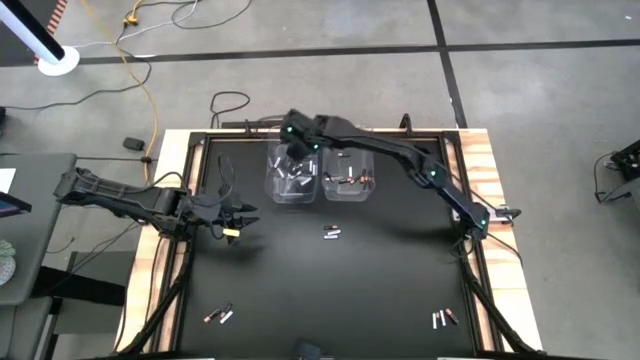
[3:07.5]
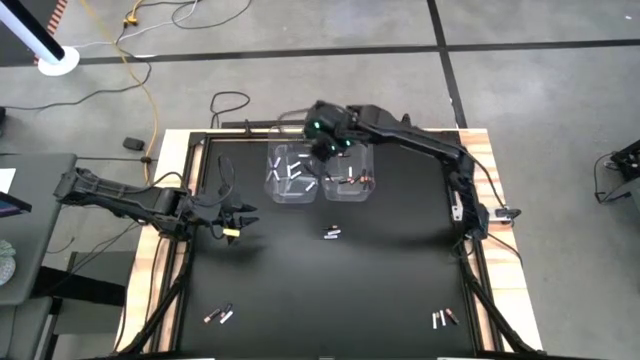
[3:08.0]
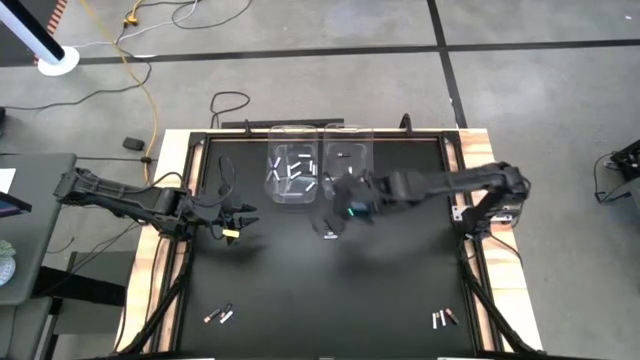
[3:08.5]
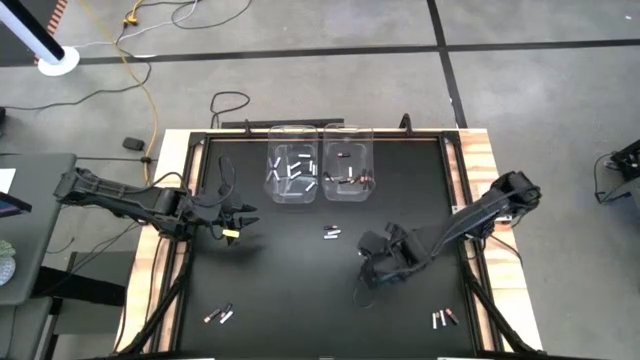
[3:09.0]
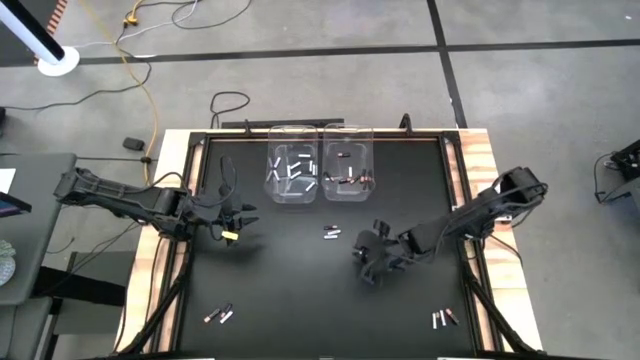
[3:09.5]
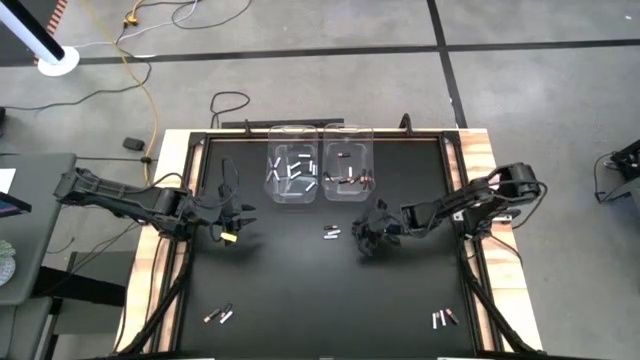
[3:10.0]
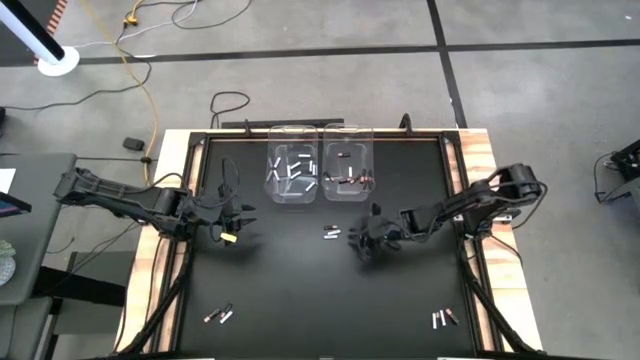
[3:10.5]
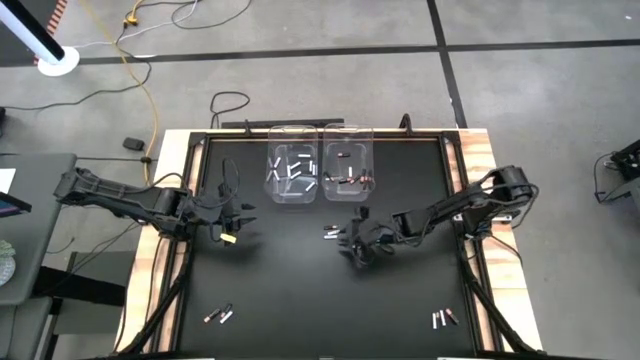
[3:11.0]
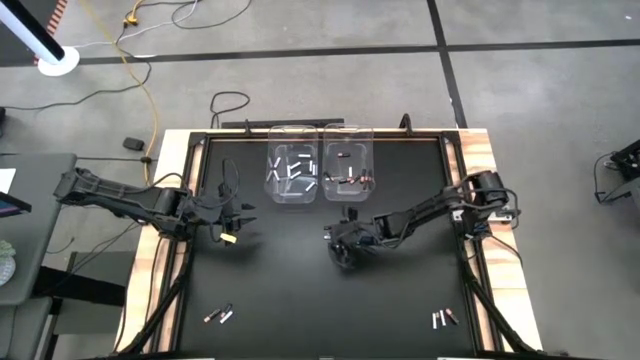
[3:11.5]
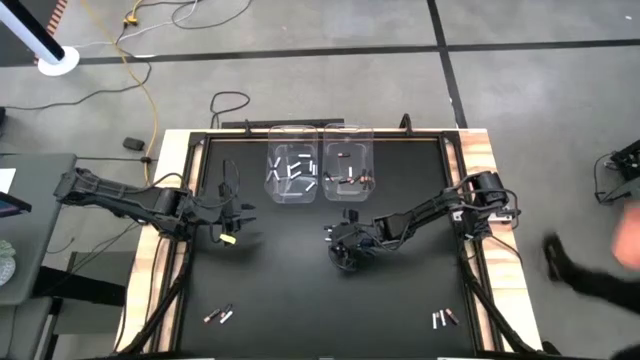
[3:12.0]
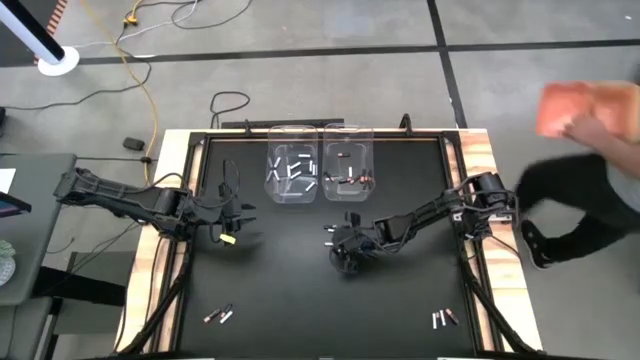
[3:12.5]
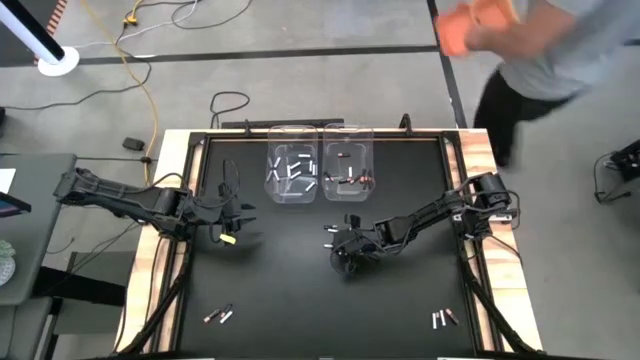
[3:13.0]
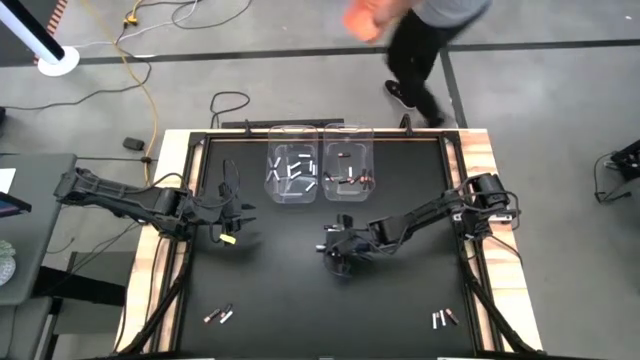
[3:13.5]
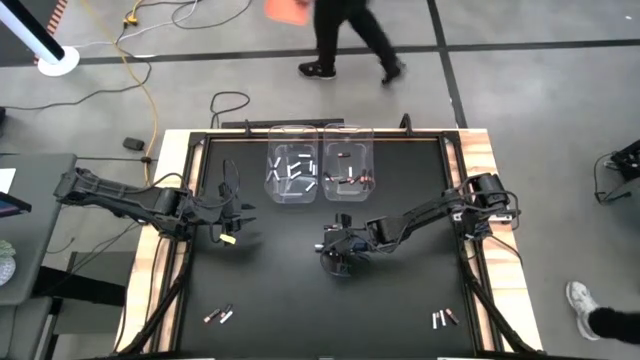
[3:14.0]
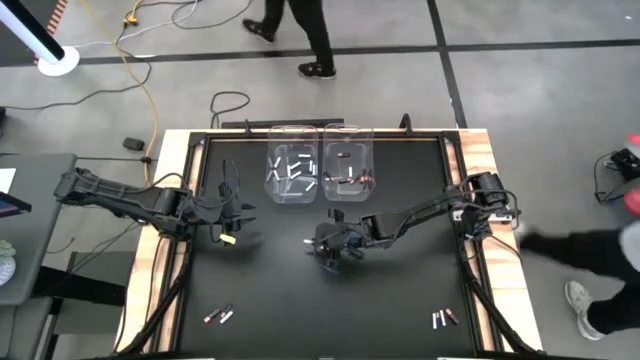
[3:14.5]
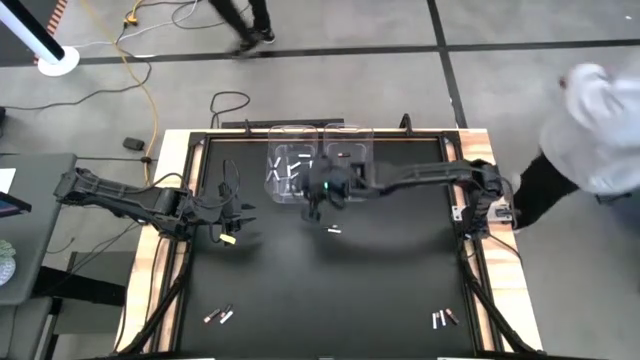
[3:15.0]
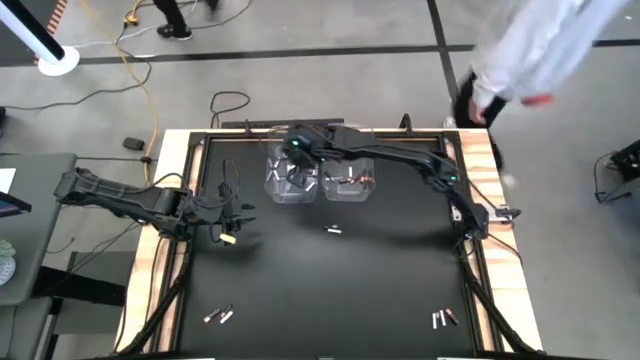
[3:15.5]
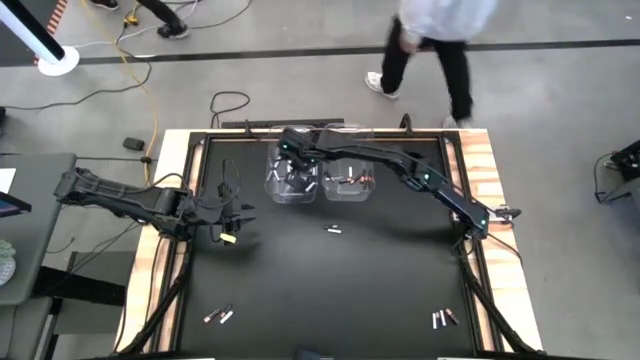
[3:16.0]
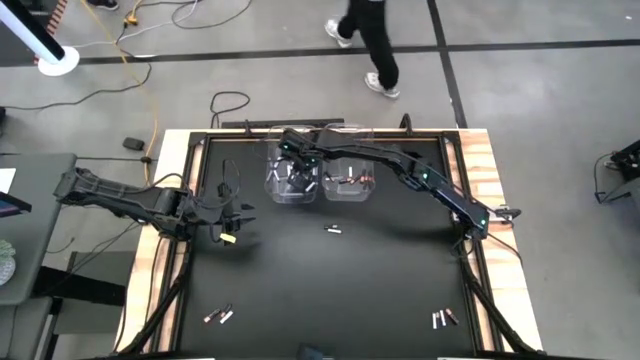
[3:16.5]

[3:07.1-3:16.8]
Task: Sort batteries
Put the white battery into the left transparent bin

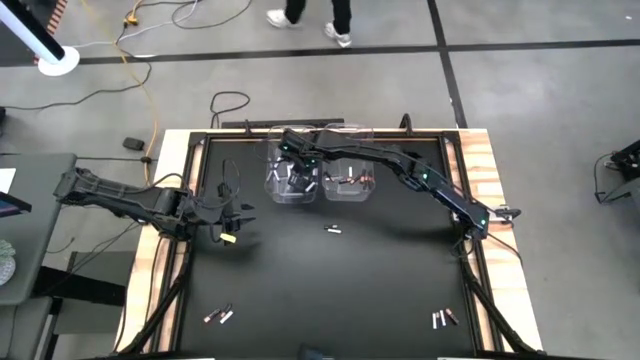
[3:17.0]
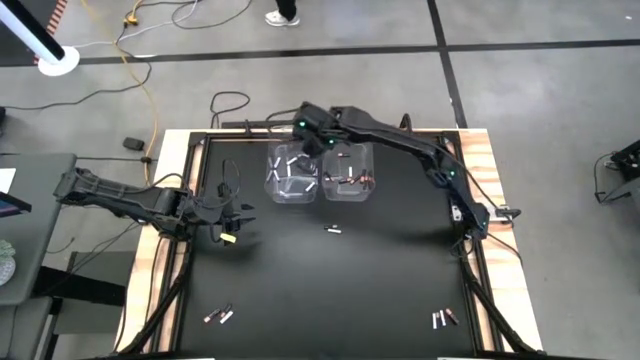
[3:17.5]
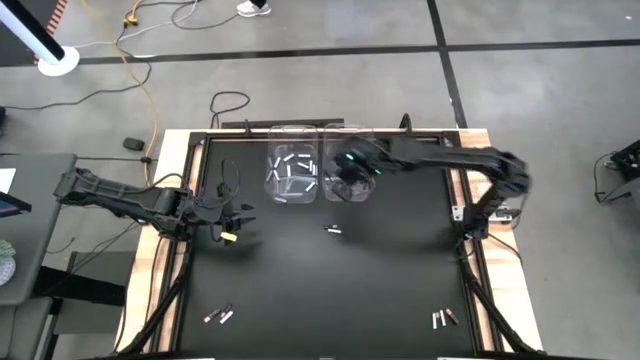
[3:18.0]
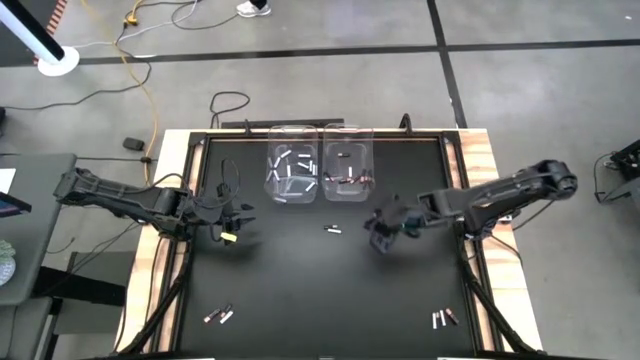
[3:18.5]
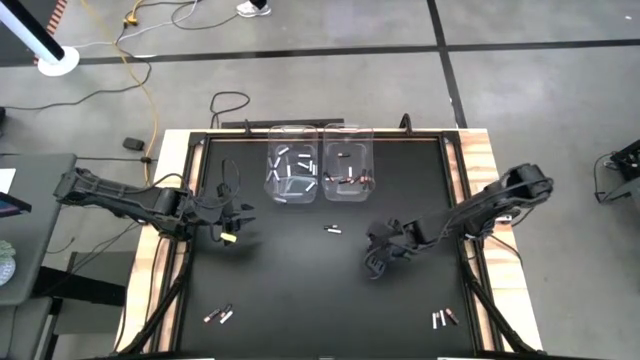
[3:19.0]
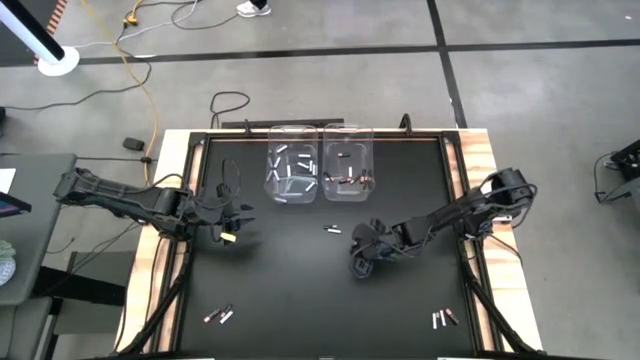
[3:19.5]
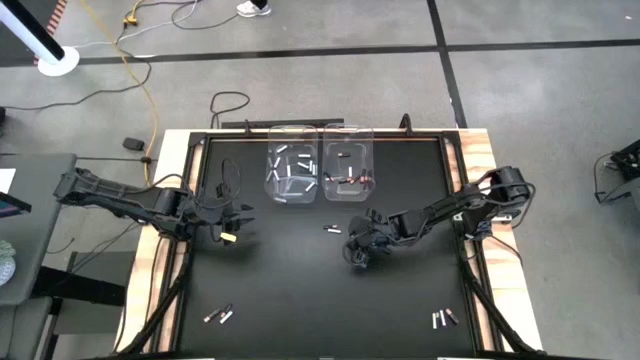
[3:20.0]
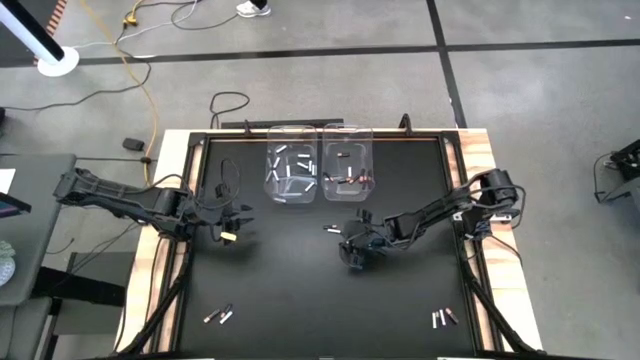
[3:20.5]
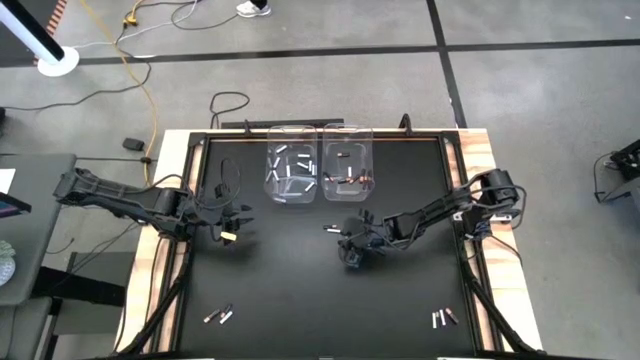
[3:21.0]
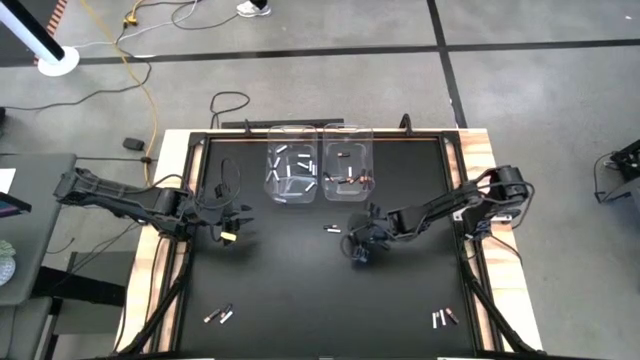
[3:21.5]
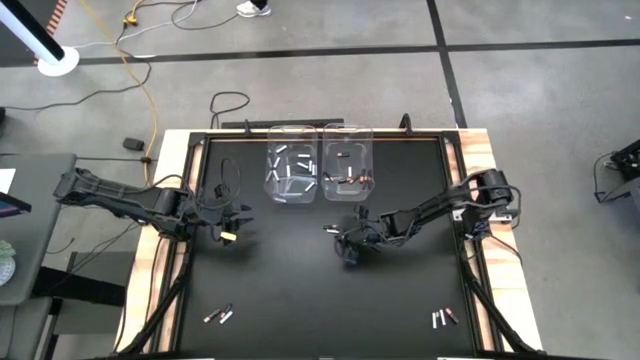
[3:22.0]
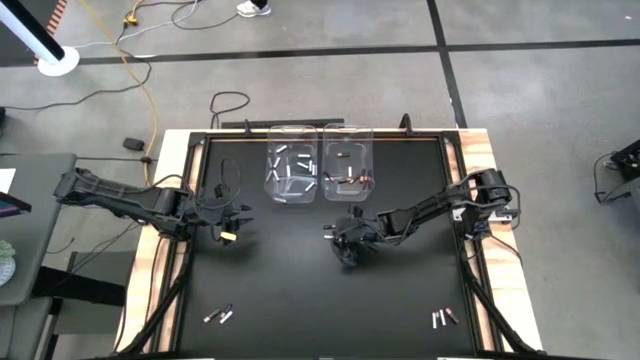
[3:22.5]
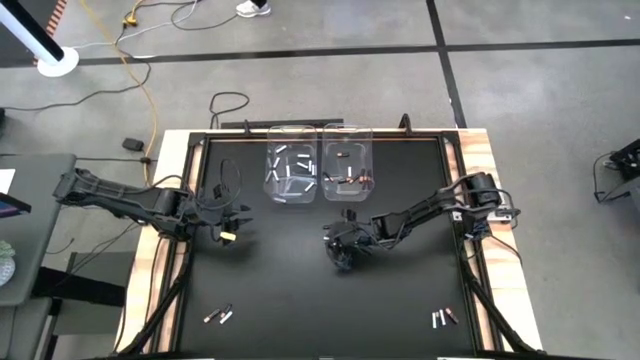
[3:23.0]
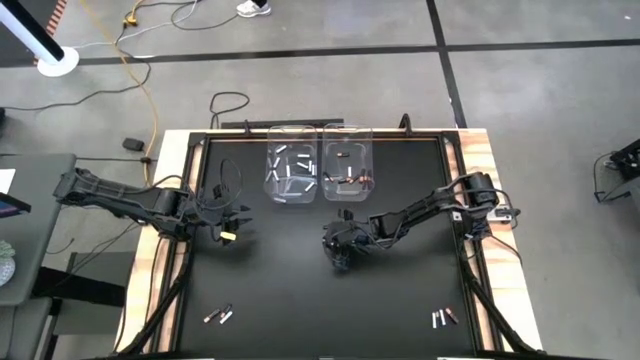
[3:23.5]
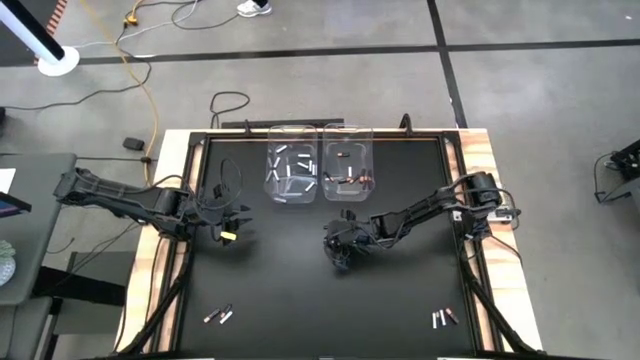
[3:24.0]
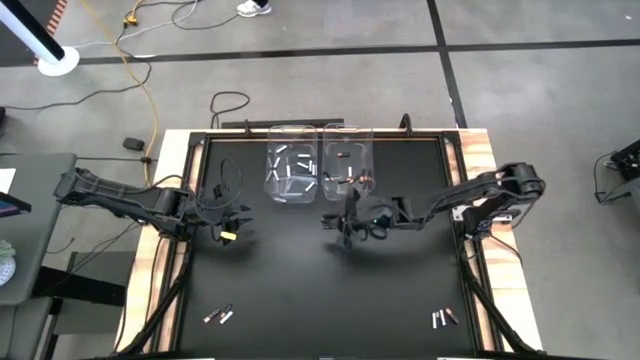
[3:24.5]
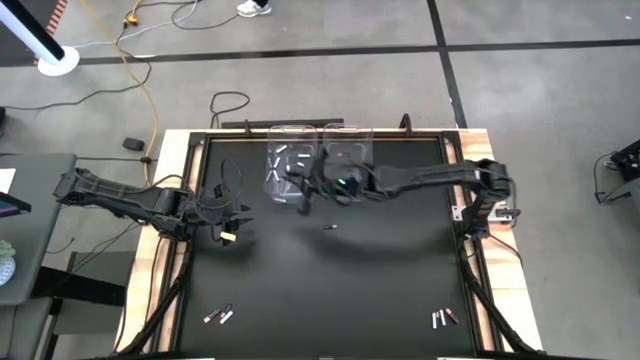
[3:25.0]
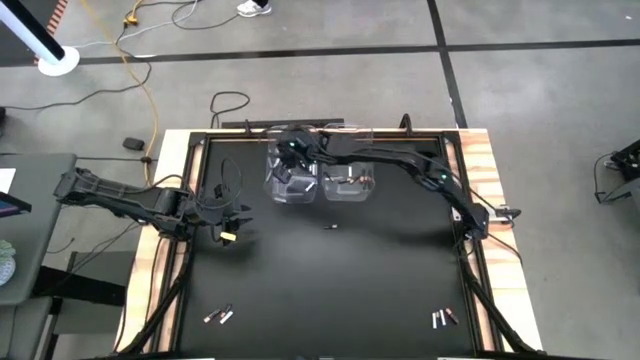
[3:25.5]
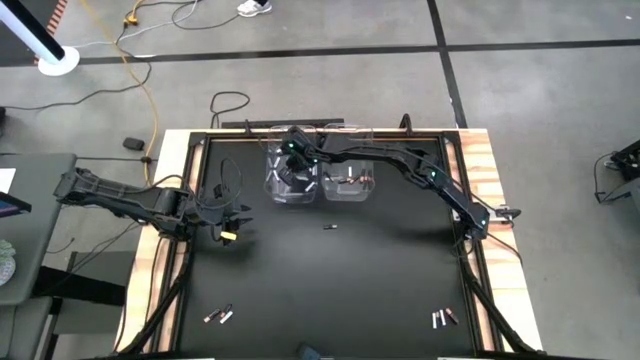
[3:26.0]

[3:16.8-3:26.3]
Put the white battery into the left transparent bin
